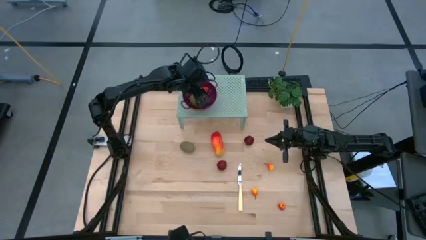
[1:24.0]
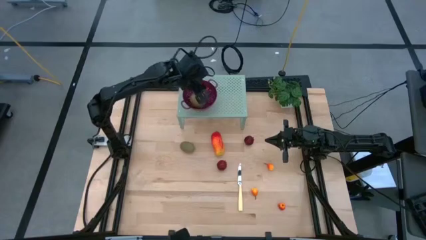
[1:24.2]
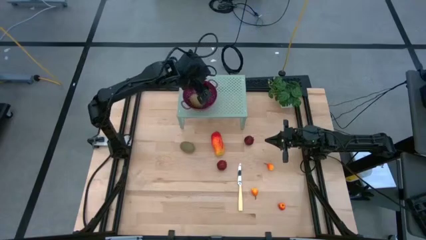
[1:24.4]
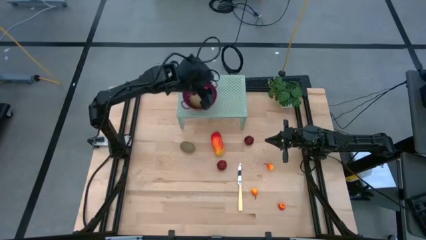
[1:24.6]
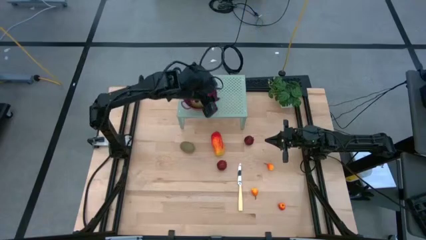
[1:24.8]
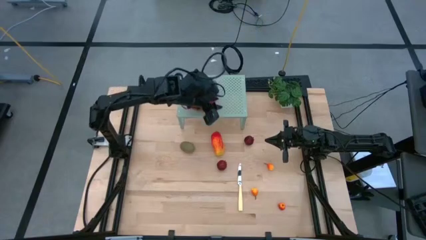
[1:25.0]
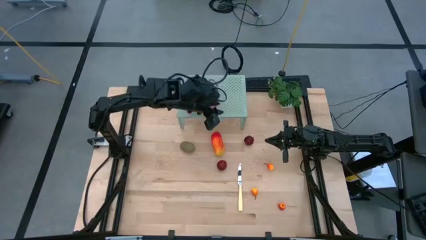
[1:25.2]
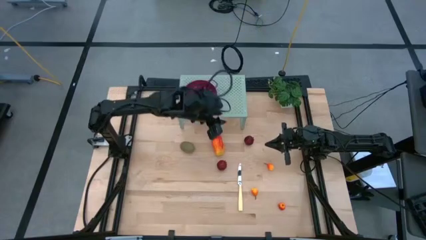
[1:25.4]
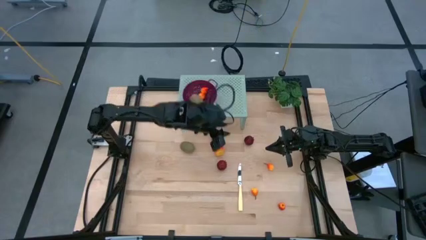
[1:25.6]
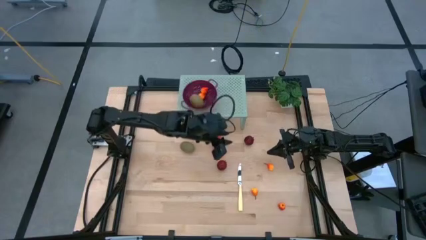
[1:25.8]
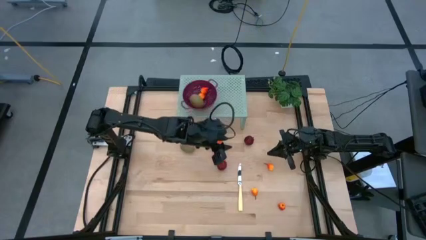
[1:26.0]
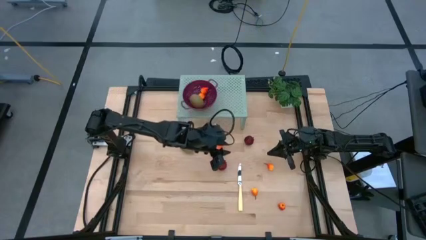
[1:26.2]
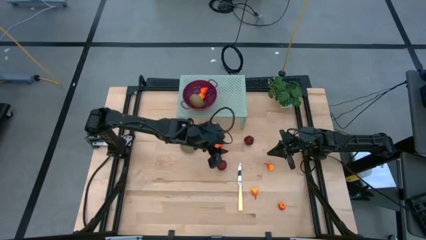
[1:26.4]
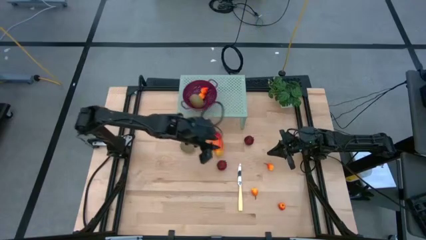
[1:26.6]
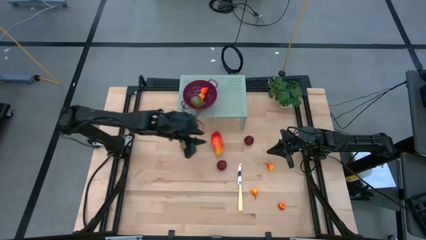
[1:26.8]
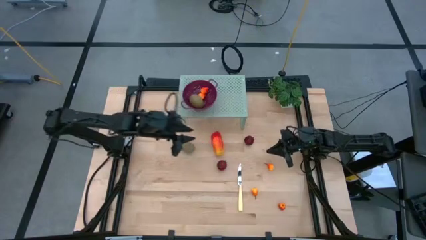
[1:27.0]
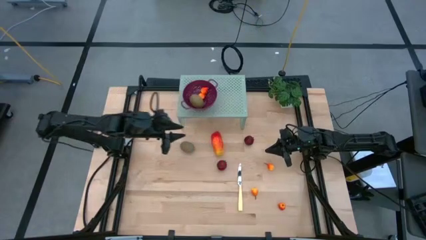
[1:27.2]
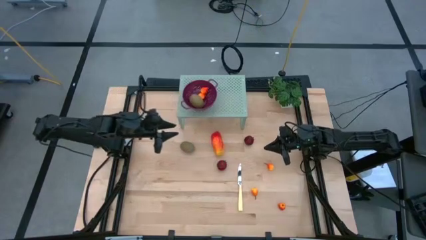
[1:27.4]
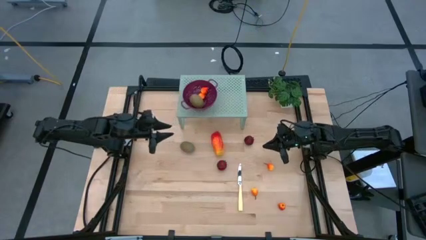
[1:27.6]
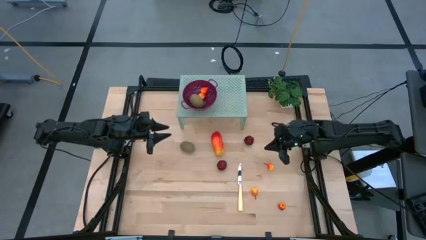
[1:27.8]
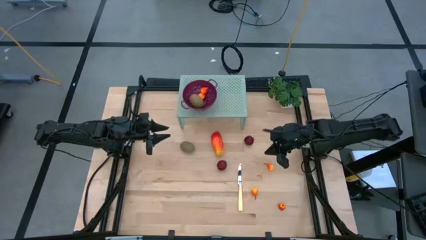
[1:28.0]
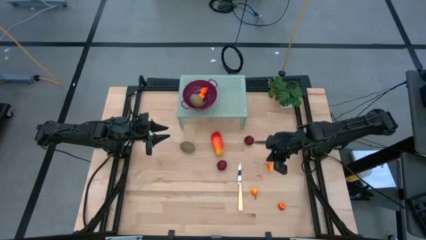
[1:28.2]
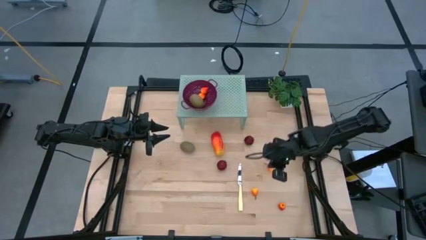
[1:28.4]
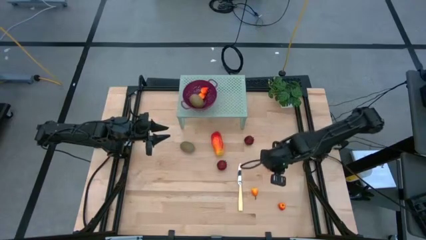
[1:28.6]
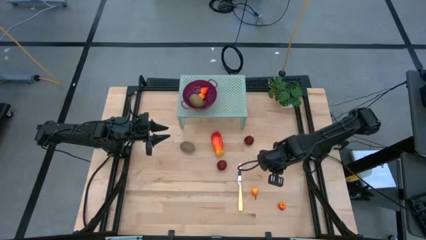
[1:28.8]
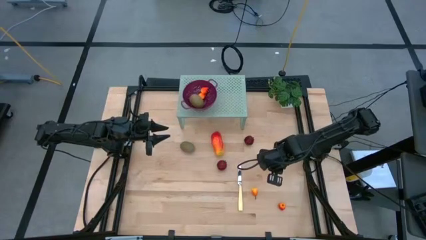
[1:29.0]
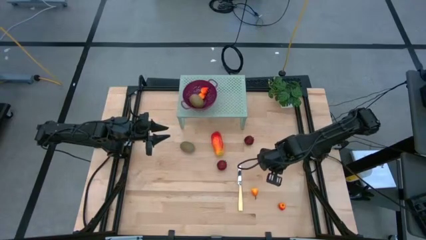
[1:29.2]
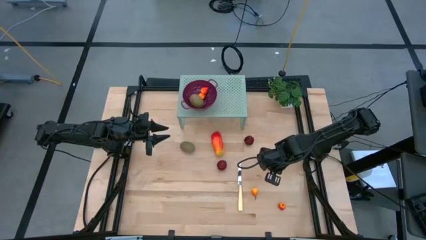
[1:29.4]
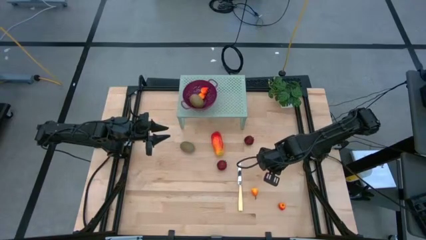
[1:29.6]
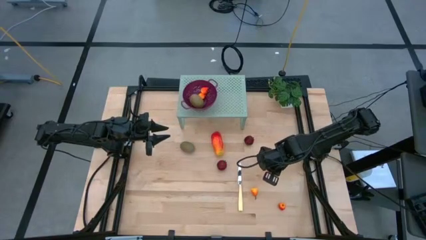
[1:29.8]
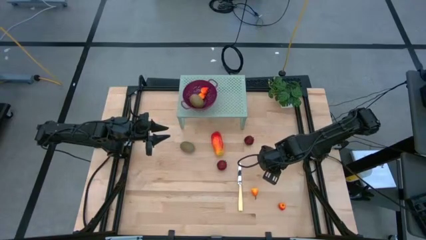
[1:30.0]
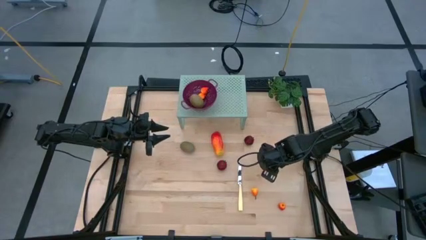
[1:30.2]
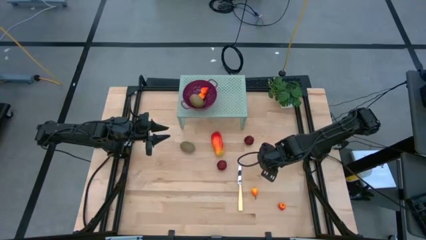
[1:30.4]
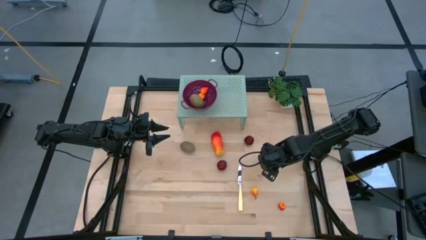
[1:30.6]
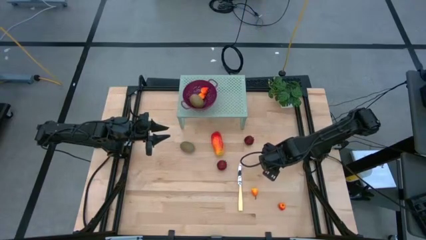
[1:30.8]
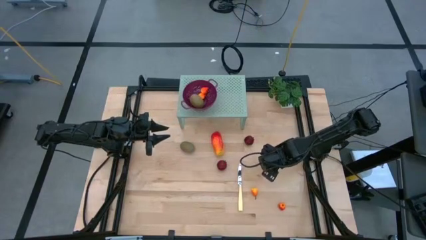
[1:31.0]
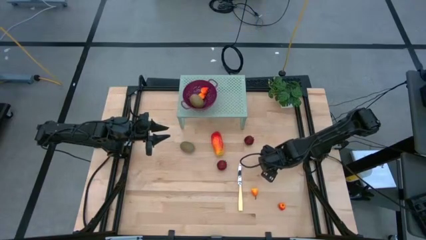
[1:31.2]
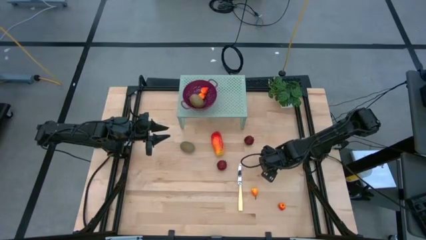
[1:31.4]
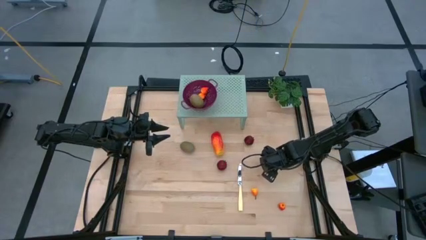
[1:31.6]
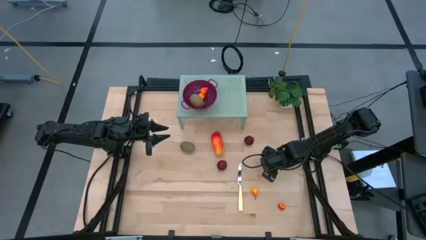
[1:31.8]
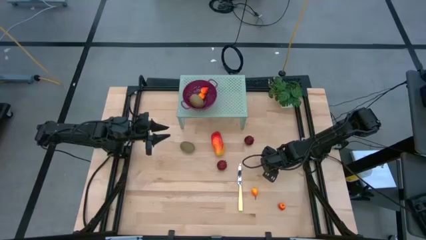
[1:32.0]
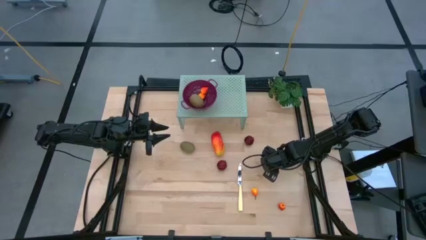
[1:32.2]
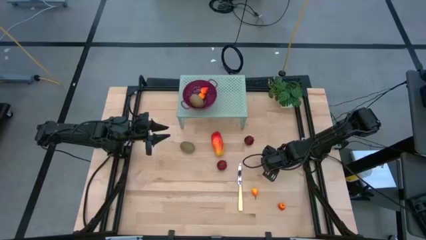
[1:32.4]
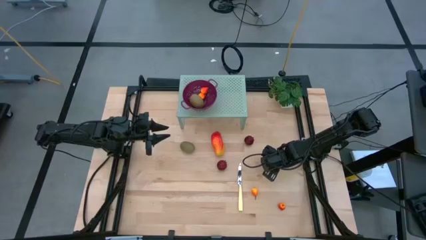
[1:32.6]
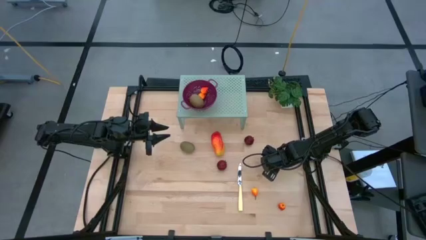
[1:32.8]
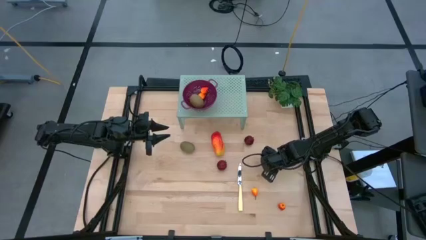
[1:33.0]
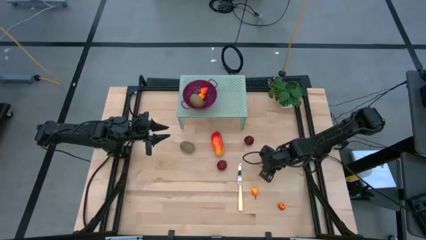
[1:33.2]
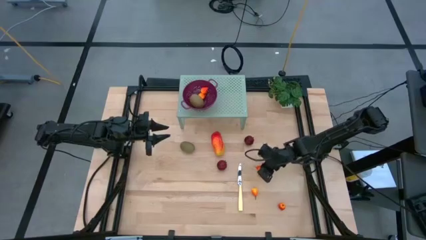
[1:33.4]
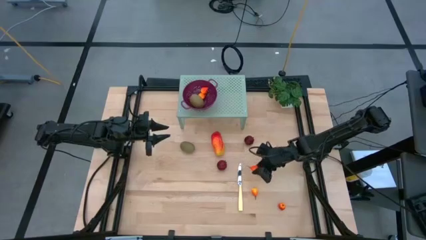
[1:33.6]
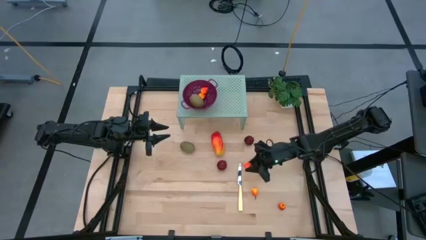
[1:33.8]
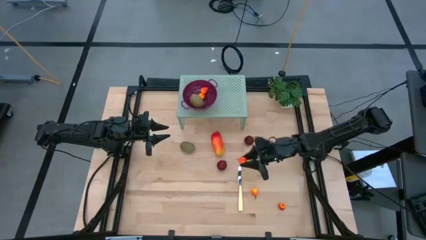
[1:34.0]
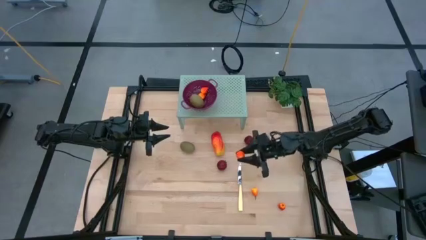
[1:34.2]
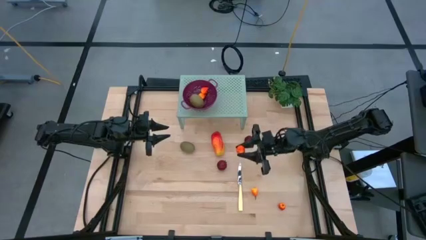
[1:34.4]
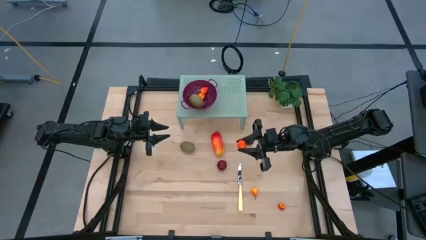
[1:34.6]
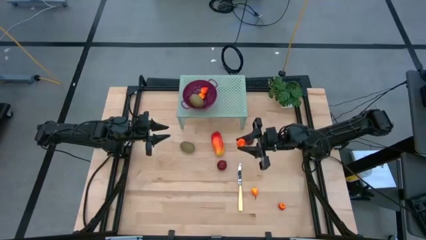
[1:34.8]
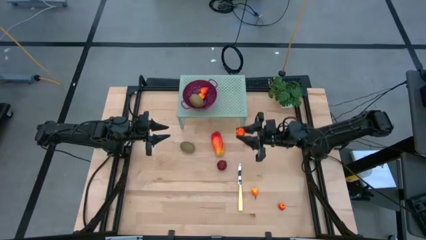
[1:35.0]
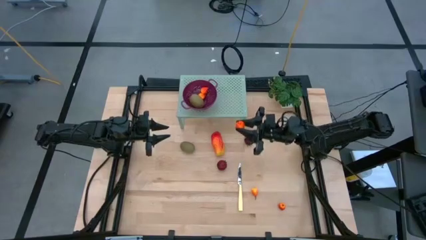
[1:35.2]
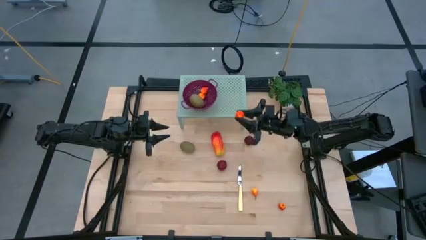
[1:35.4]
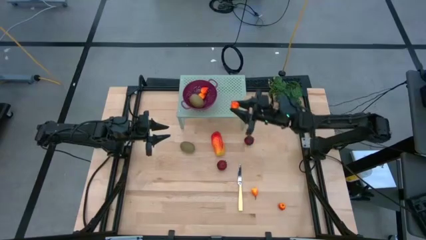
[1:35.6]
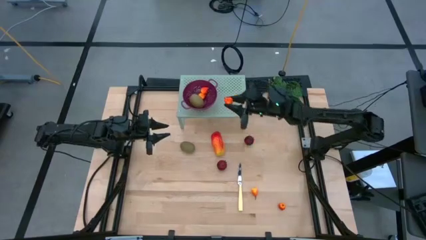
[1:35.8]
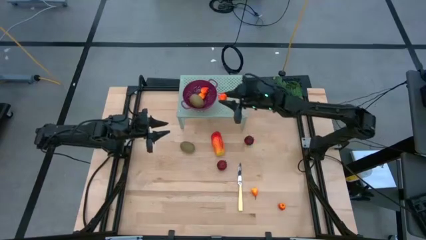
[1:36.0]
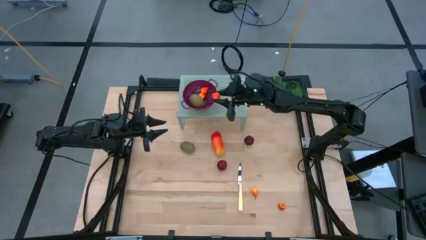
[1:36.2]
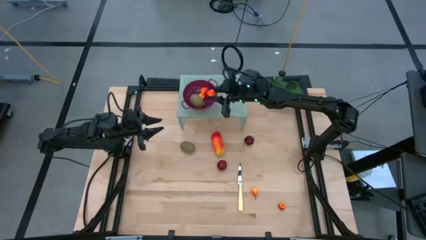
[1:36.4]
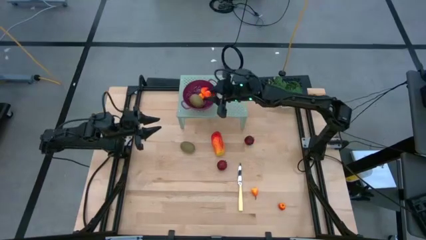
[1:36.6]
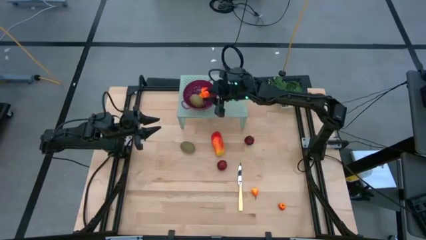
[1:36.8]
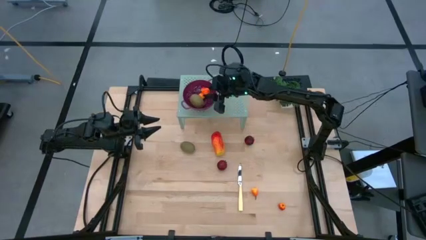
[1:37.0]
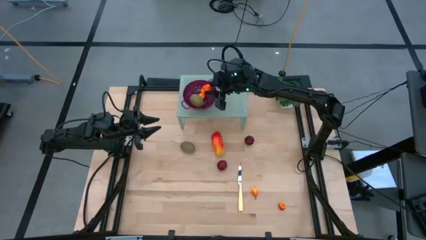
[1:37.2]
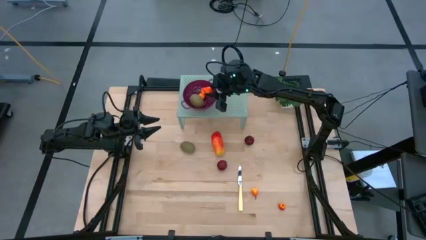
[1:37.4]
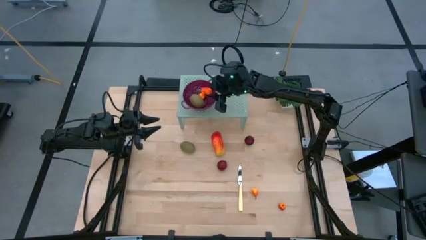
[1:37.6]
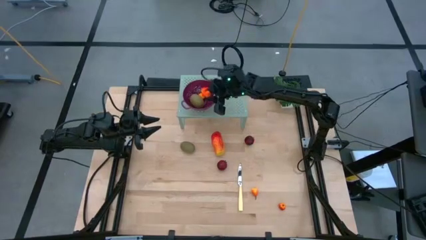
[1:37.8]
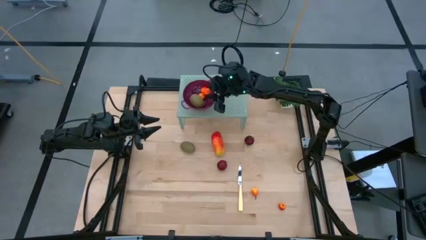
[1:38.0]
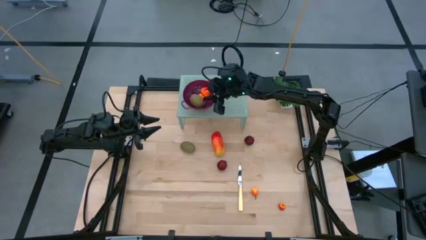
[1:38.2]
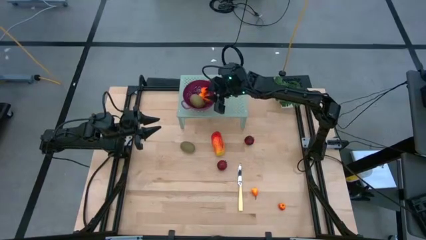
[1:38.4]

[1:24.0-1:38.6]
Task: Pick & Place Fruit
Put the pear into violet strainer bowl on the shelf
